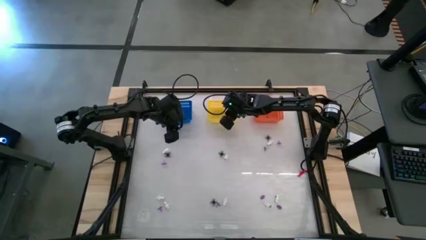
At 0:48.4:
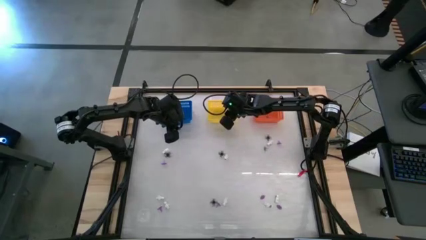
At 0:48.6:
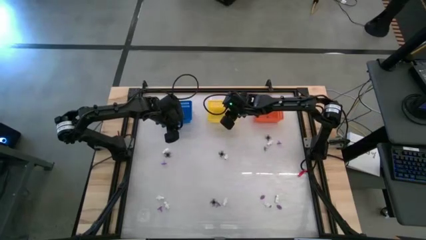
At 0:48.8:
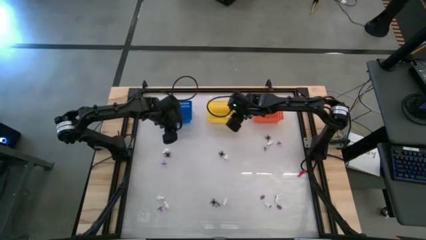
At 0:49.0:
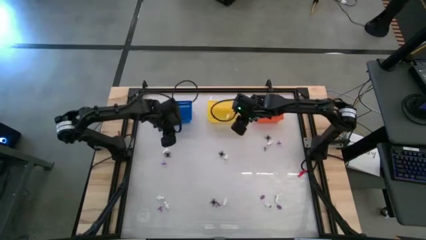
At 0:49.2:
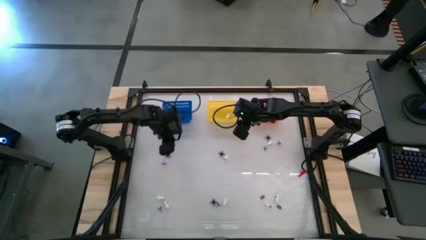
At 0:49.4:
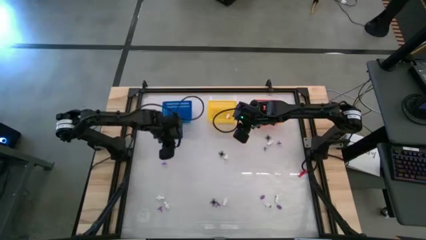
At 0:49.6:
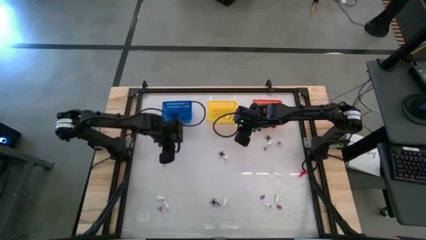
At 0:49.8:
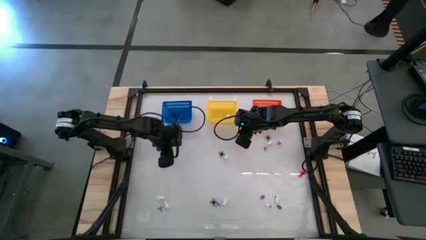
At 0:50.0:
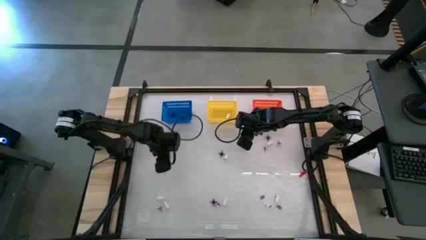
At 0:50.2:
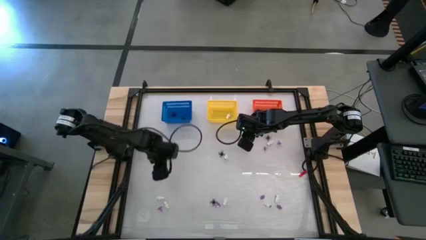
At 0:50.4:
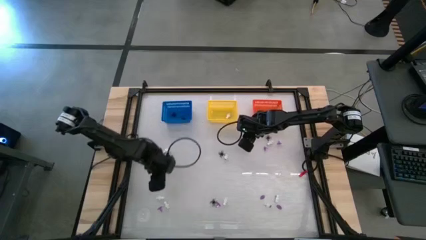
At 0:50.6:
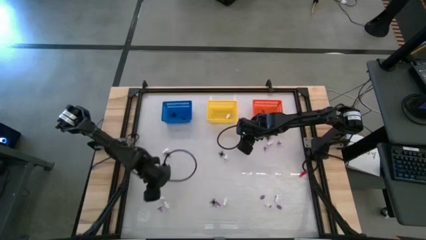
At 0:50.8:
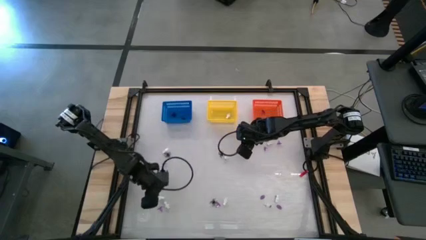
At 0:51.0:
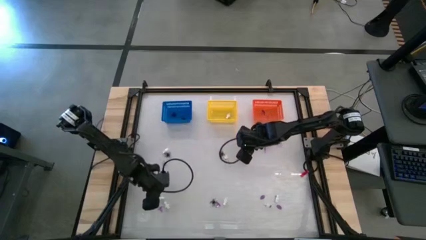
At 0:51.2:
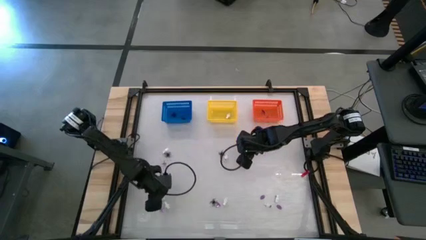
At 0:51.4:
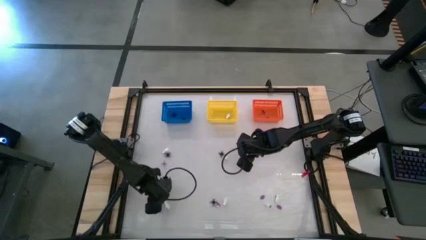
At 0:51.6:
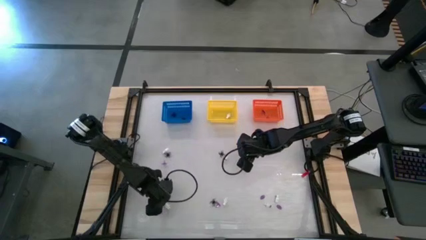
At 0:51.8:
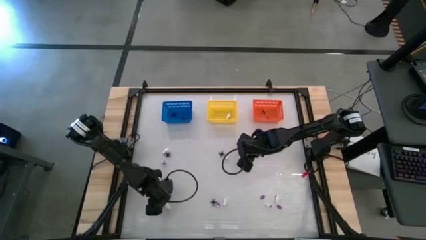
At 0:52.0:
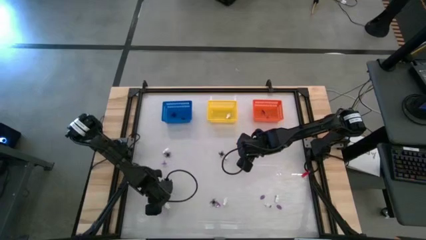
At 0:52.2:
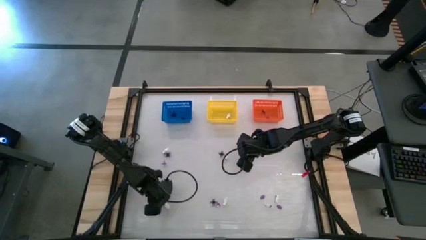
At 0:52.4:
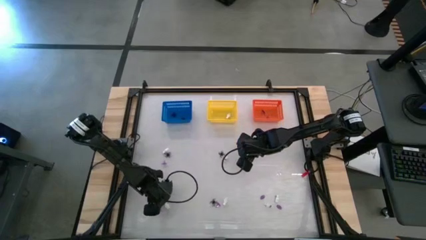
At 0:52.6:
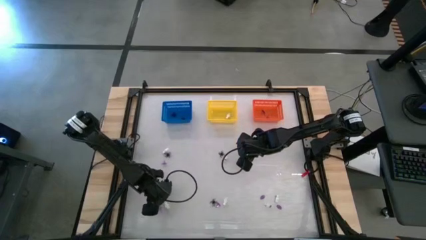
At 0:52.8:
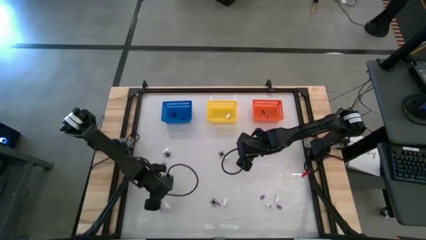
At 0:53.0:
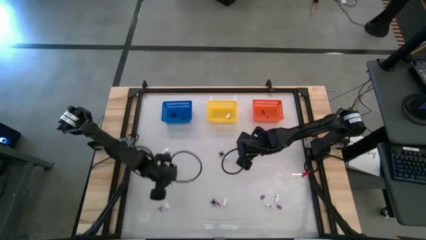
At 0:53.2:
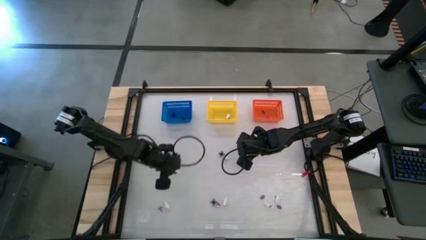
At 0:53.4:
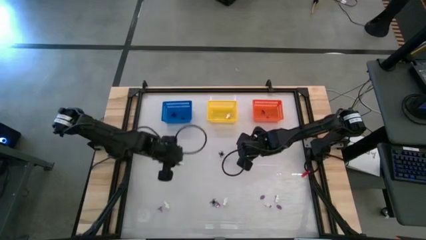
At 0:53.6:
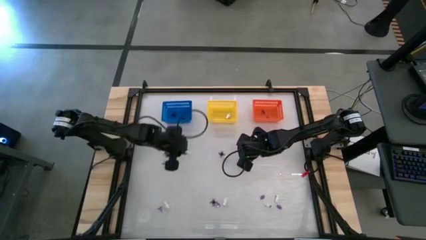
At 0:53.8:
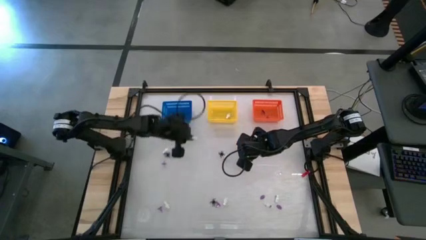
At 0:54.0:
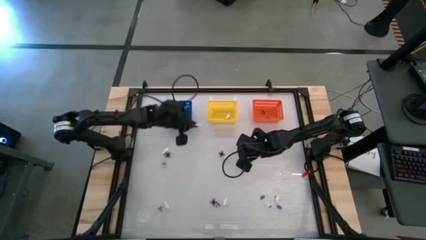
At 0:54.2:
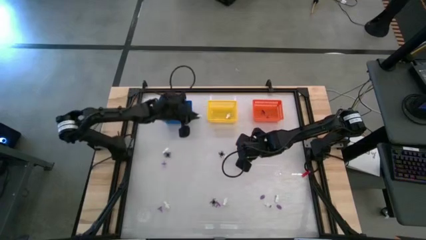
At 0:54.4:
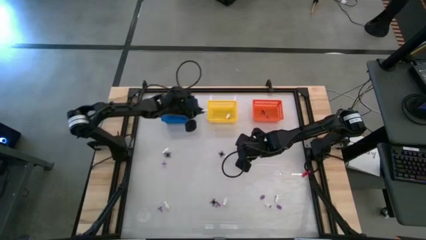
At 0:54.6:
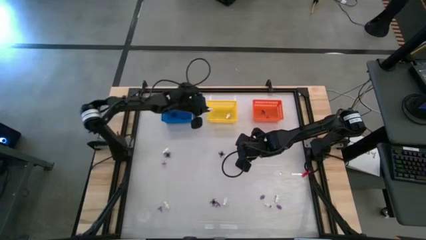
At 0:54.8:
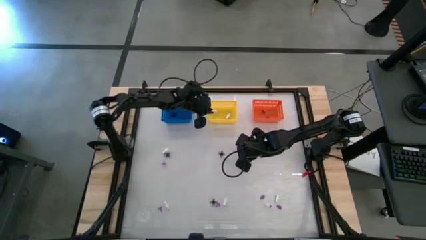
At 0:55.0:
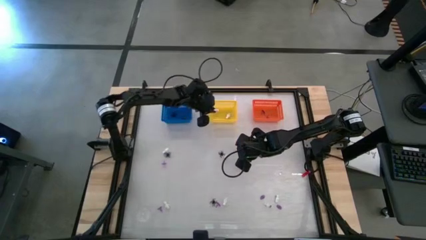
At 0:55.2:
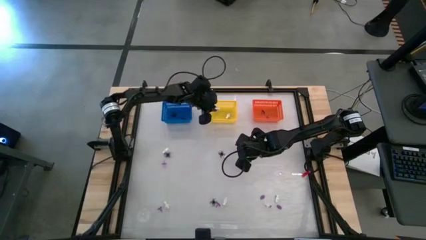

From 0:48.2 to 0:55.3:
Task: Sort Halloween decoration
Put the white skeleton toy into the yellow basket

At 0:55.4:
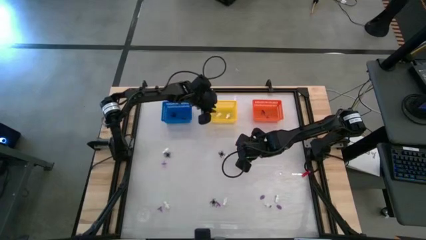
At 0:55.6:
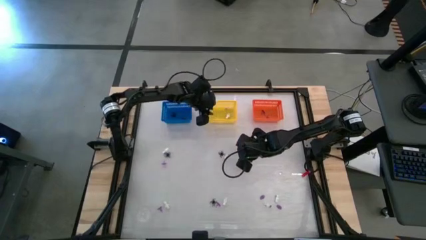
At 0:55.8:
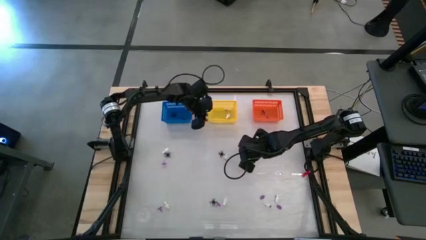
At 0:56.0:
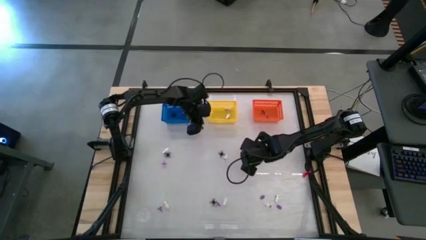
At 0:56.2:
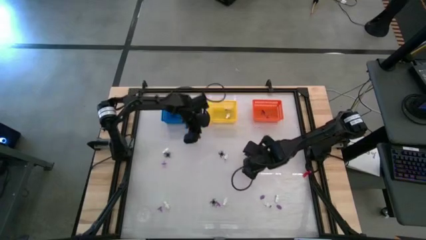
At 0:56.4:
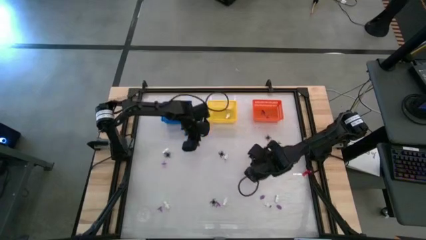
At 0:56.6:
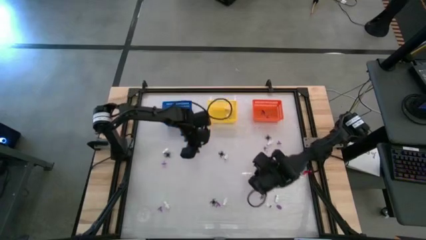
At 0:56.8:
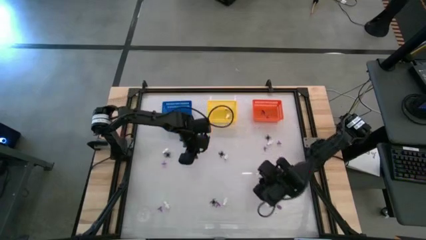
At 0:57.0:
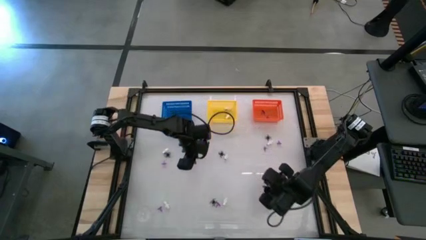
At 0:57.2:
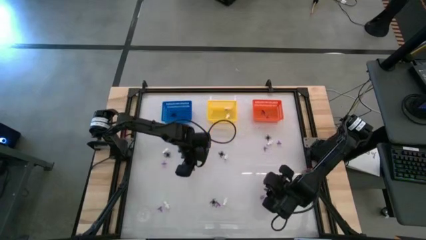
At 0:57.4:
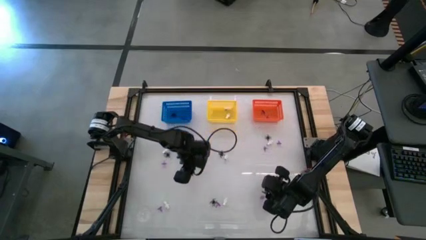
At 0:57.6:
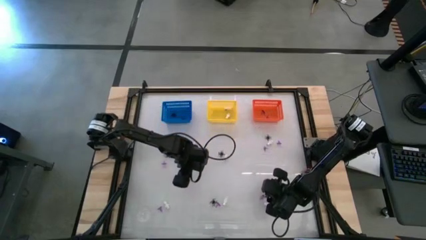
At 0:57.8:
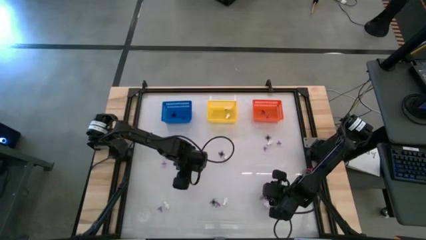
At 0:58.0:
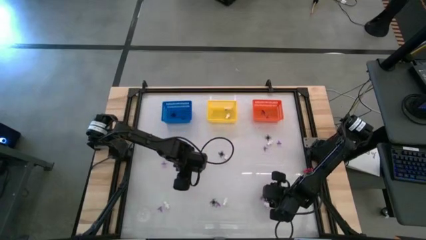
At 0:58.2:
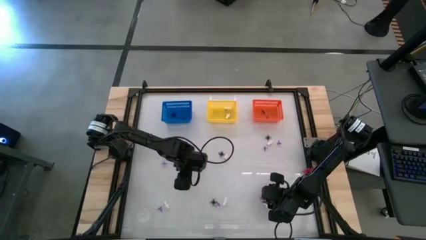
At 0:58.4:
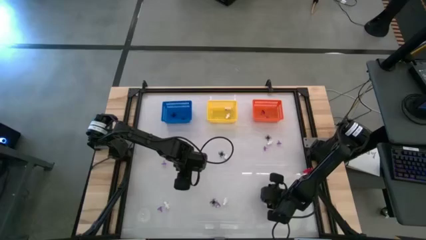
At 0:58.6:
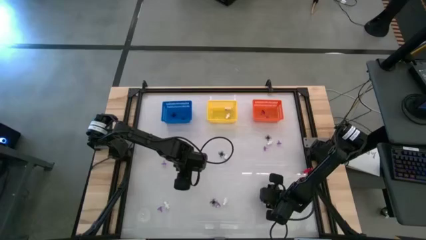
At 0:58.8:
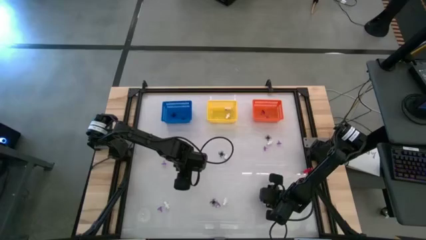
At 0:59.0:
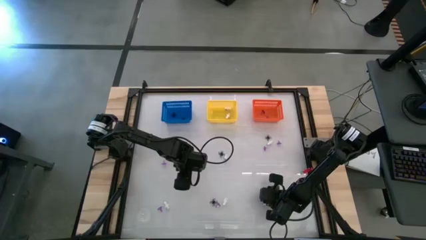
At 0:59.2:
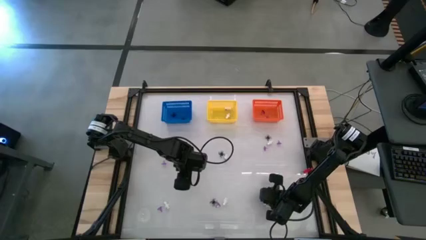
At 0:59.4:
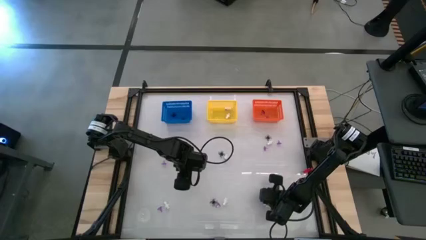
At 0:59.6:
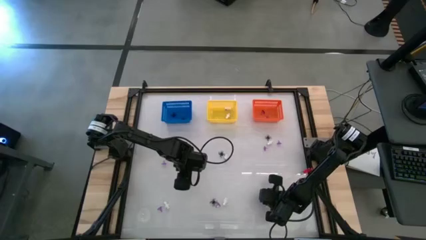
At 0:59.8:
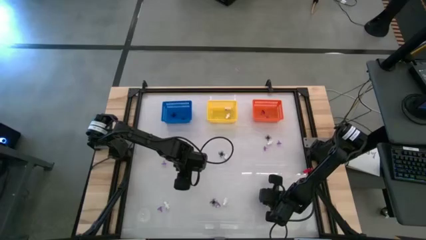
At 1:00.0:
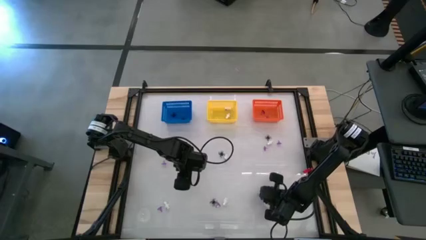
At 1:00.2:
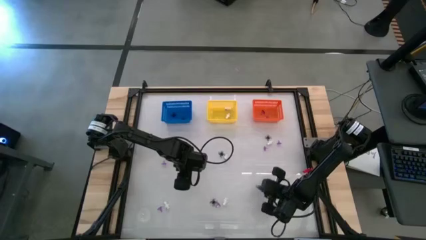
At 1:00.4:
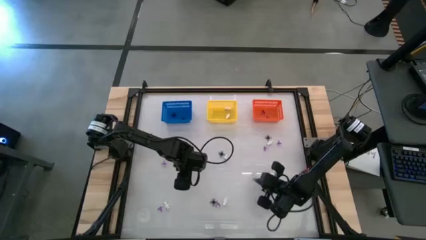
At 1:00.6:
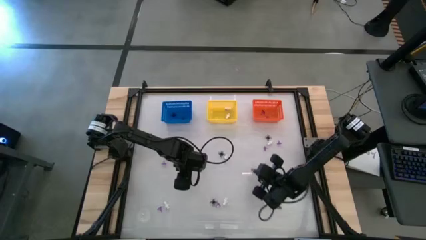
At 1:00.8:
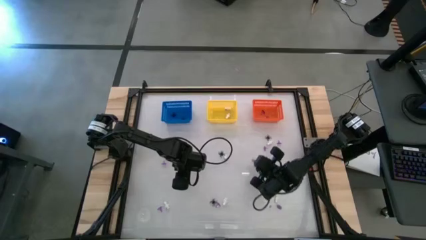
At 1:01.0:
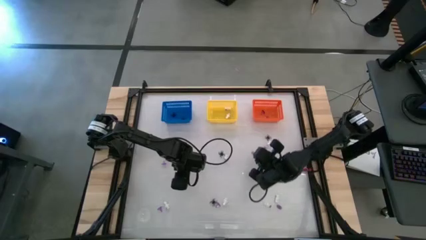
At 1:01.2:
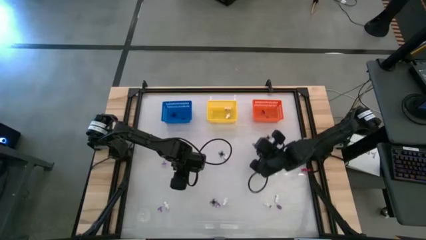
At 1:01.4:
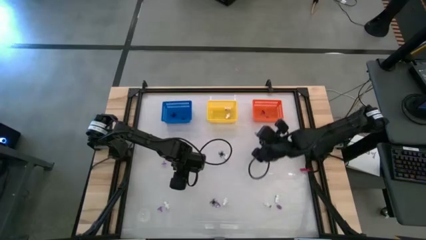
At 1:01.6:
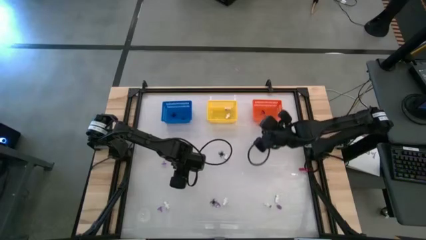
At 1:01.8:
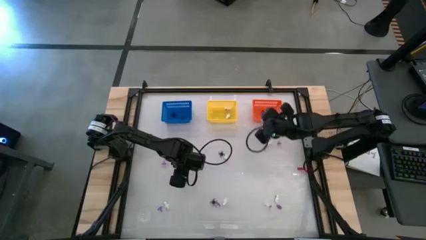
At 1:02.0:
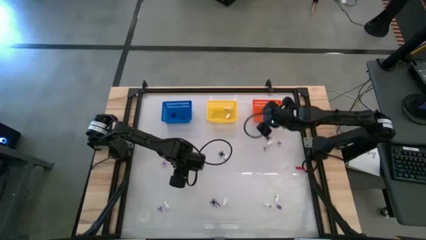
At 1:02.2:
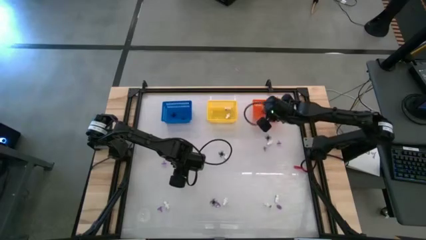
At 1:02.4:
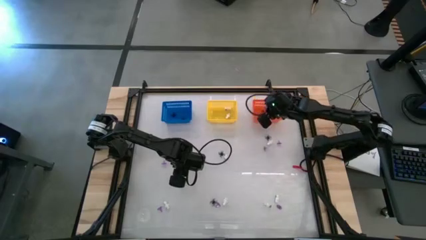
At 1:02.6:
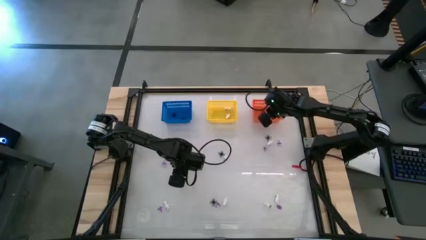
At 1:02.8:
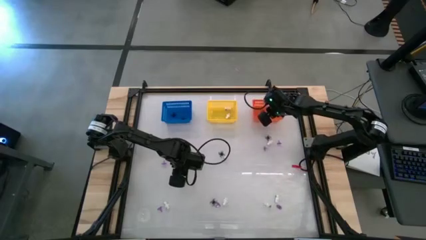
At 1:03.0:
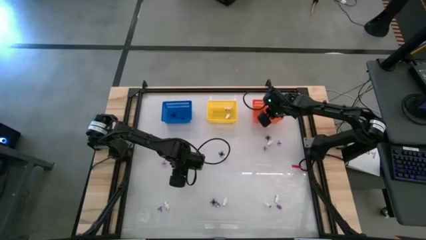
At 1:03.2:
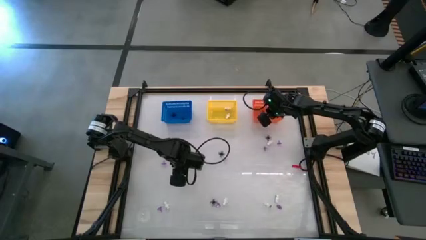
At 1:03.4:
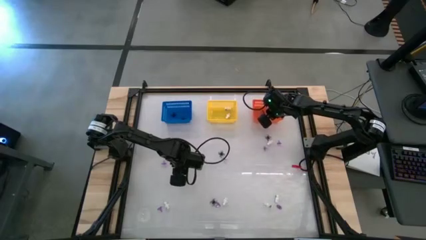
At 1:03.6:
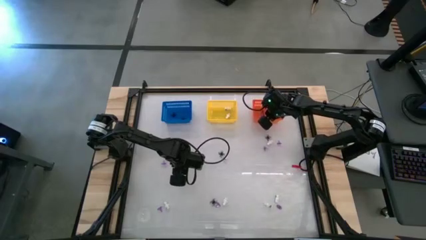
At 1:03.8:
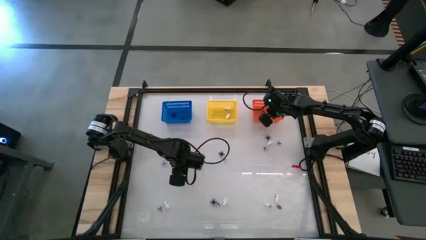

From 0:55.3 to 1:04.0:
Put the purple witch hat toy into the orange basket

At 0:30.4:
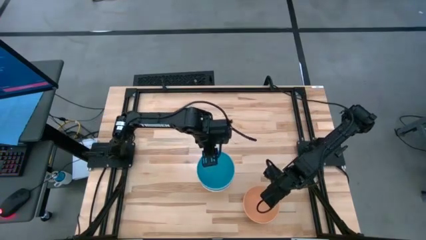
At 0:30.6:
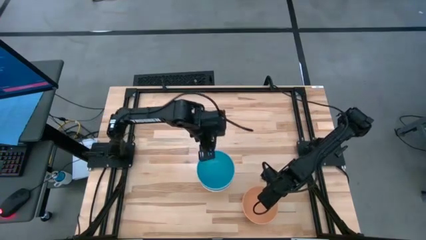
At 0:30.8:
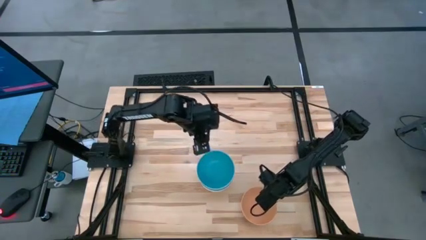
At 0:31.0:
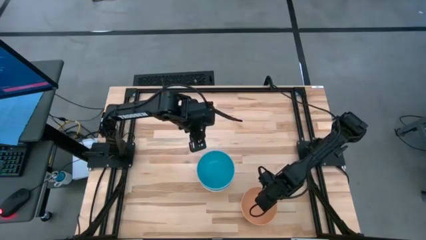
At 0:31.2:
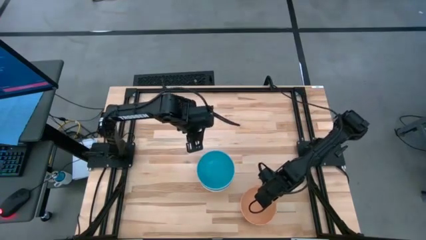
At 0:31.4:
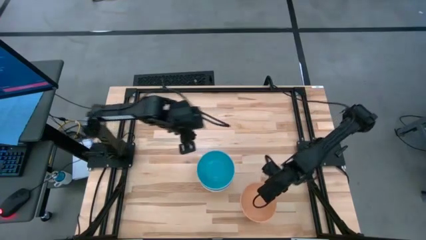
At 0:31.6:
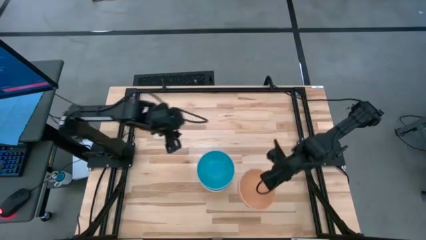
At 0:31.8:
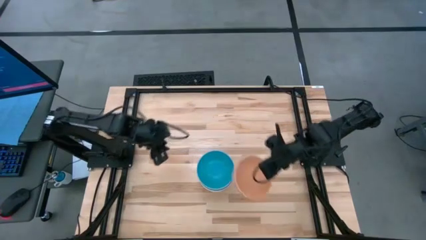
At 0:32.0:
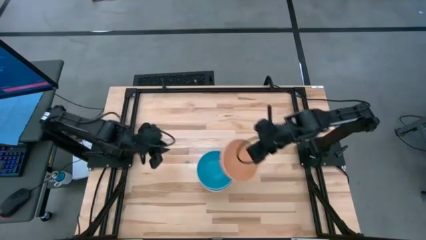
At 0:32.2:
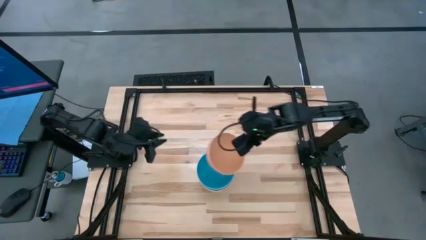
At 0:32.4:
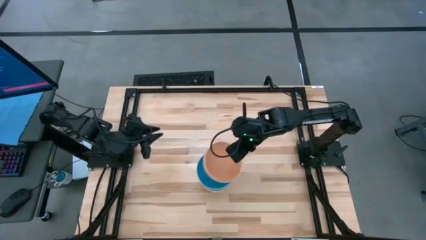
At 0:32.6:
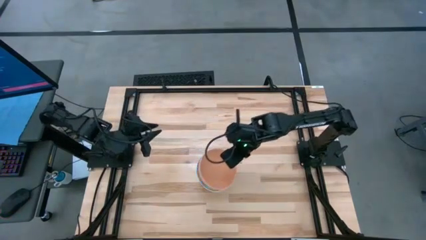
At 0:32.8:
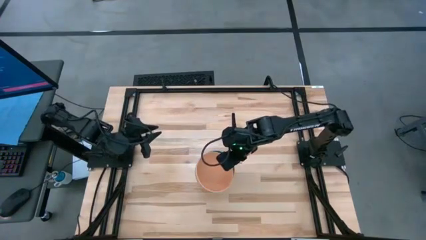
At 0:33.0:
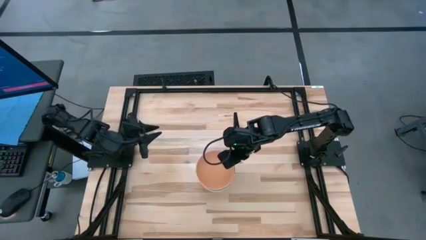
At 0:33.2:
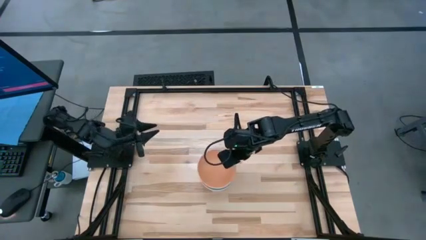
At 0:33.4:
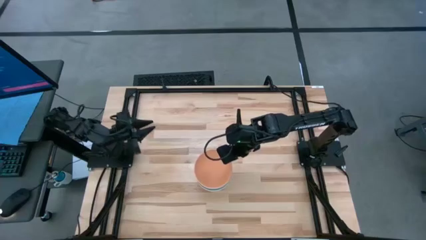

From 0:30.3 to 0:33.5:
Task: Nest bowls inside each other
Stack the orange bowl on top of the blue bowl
